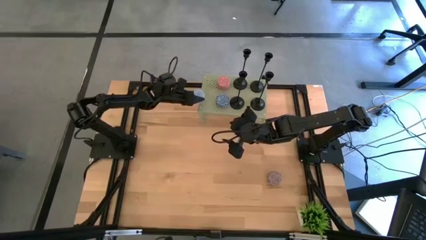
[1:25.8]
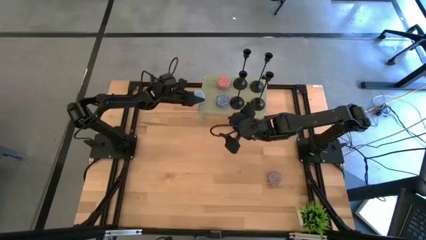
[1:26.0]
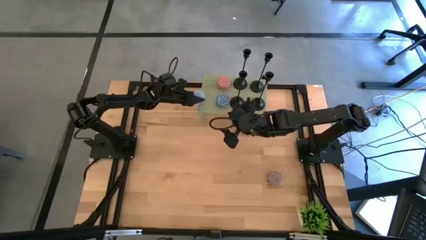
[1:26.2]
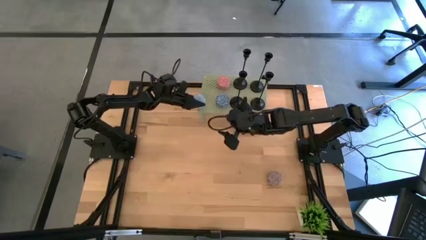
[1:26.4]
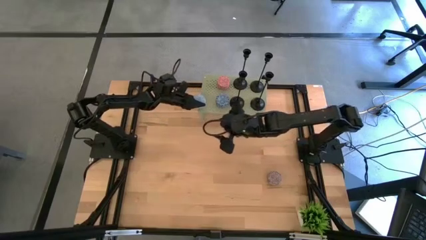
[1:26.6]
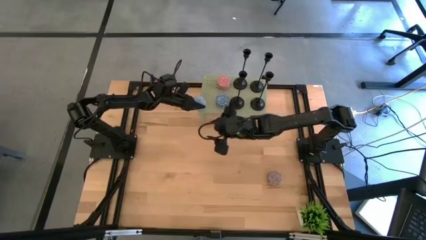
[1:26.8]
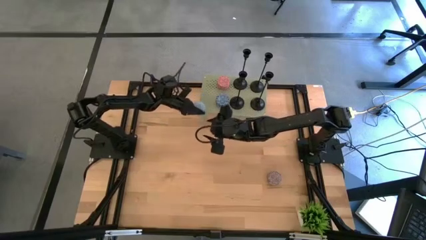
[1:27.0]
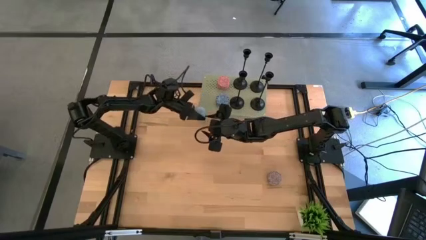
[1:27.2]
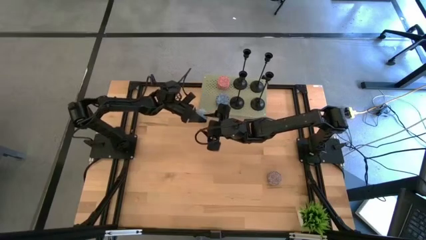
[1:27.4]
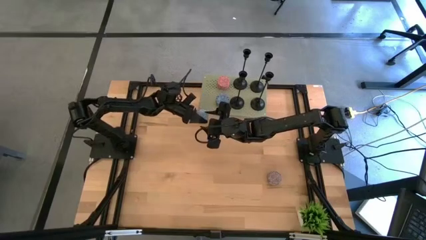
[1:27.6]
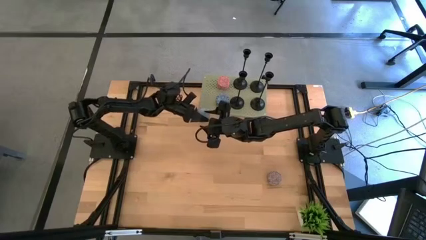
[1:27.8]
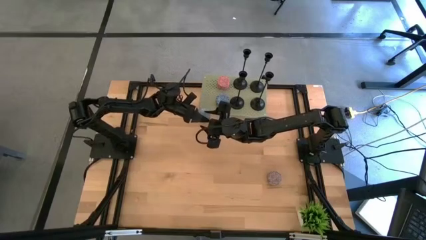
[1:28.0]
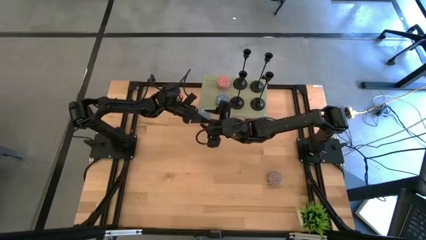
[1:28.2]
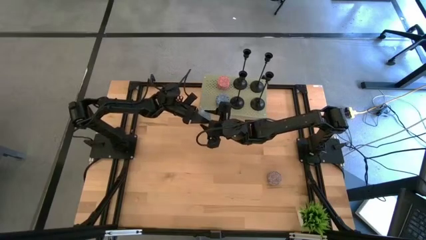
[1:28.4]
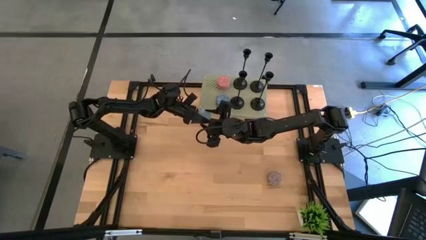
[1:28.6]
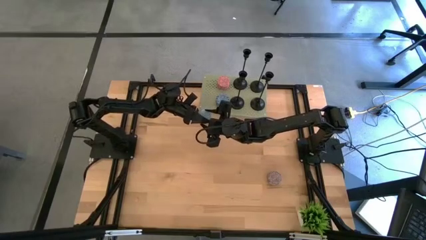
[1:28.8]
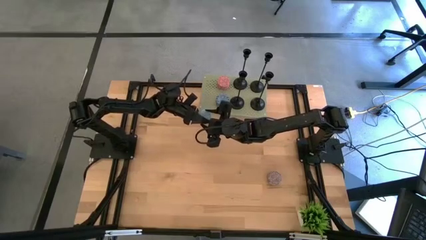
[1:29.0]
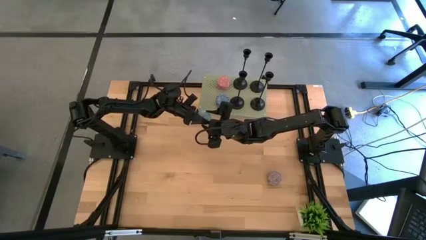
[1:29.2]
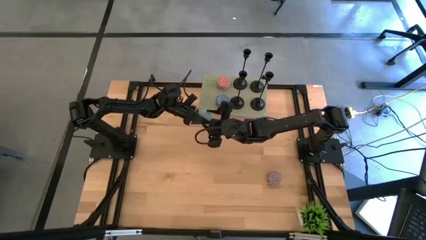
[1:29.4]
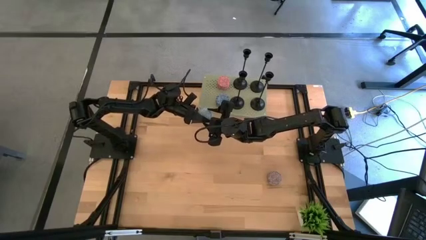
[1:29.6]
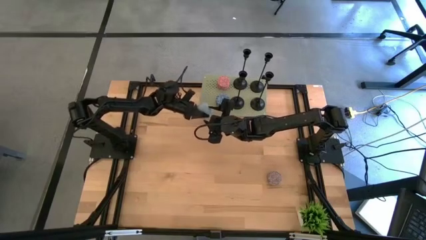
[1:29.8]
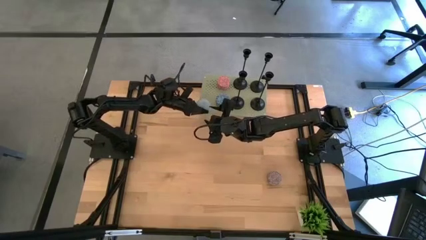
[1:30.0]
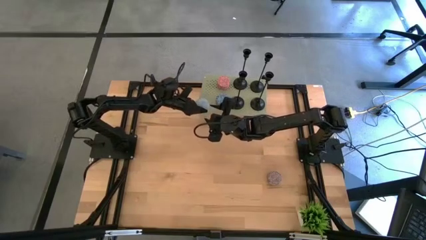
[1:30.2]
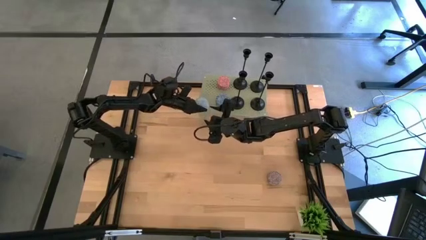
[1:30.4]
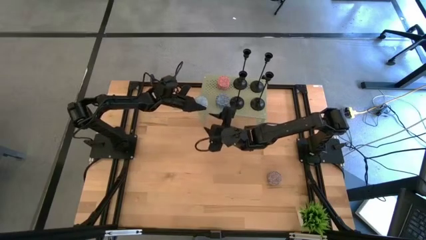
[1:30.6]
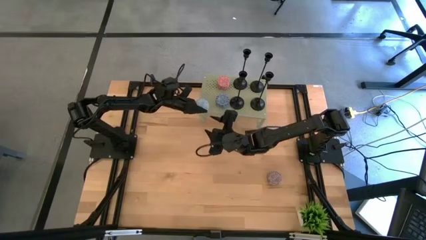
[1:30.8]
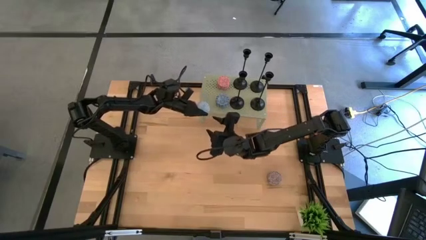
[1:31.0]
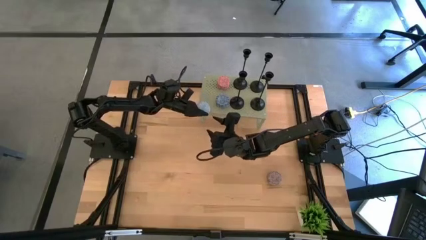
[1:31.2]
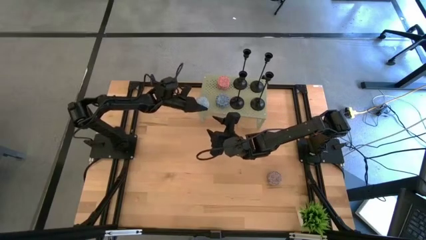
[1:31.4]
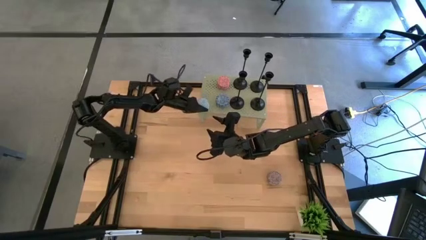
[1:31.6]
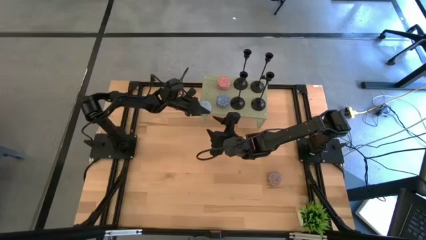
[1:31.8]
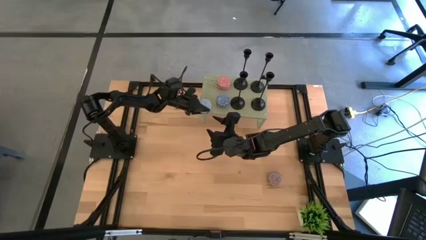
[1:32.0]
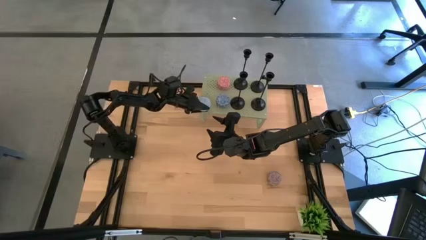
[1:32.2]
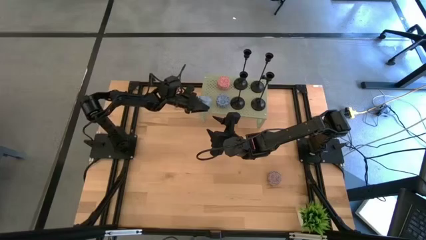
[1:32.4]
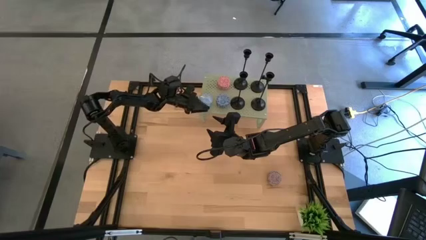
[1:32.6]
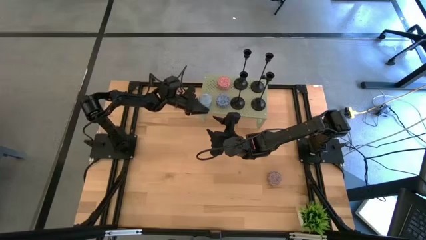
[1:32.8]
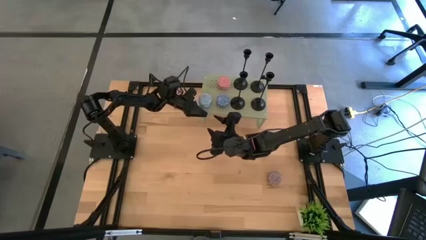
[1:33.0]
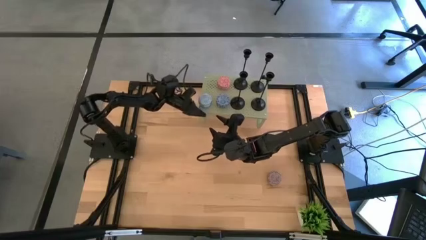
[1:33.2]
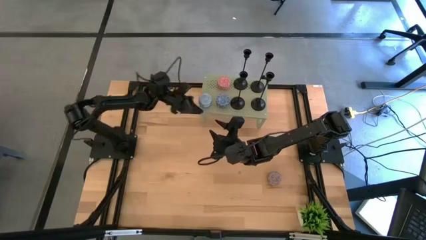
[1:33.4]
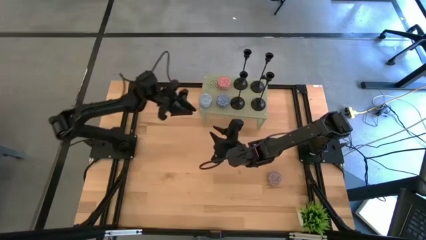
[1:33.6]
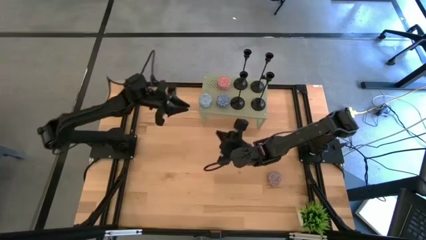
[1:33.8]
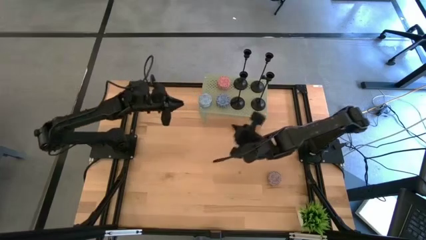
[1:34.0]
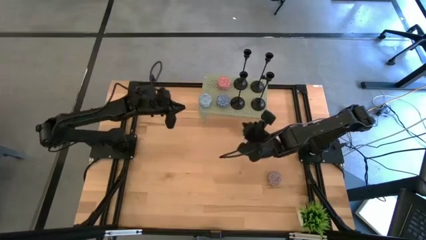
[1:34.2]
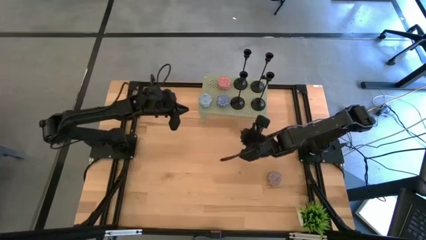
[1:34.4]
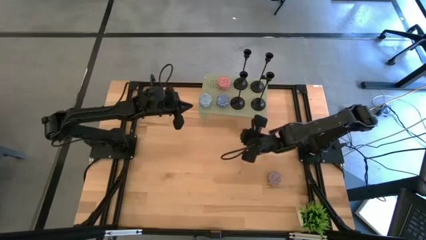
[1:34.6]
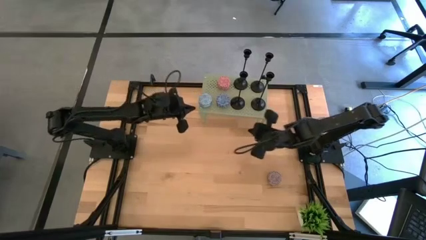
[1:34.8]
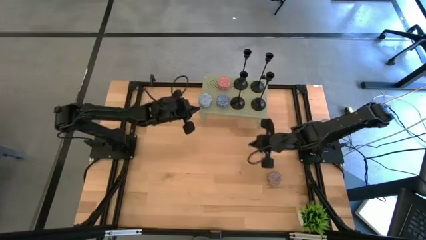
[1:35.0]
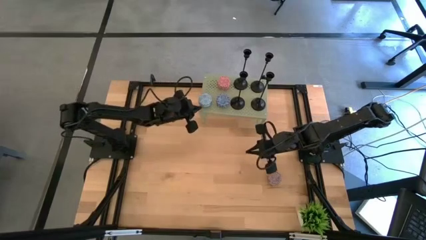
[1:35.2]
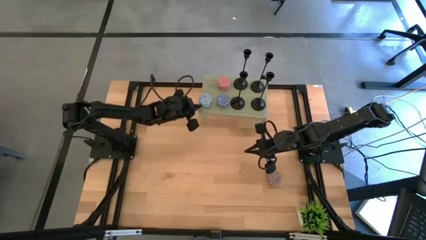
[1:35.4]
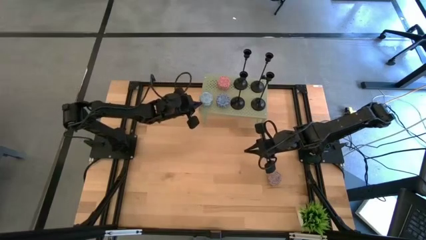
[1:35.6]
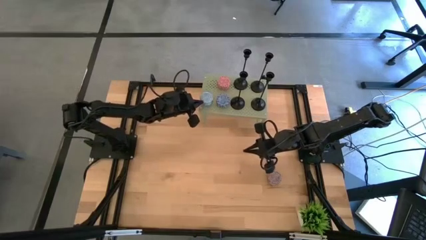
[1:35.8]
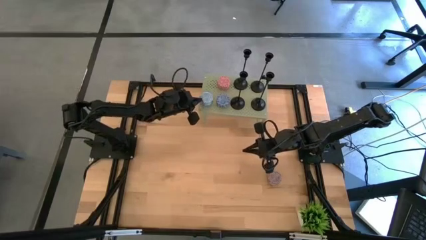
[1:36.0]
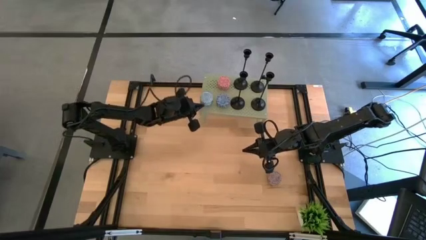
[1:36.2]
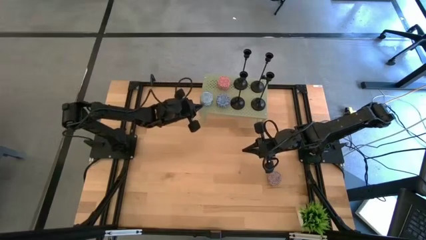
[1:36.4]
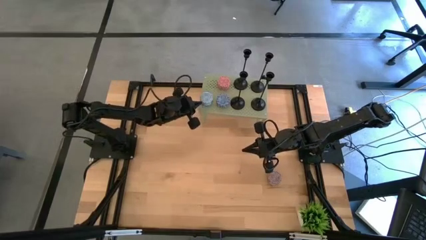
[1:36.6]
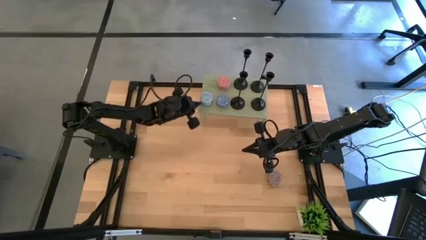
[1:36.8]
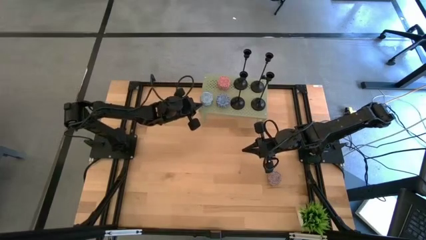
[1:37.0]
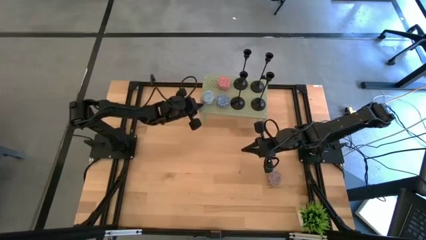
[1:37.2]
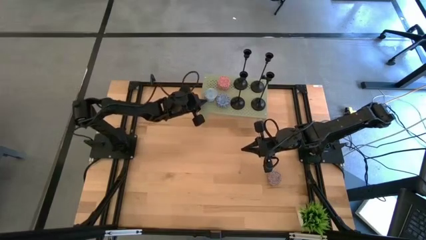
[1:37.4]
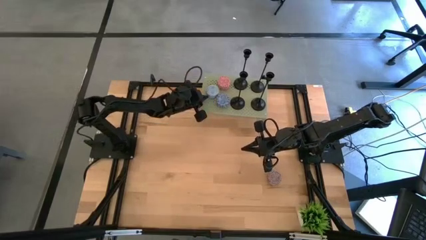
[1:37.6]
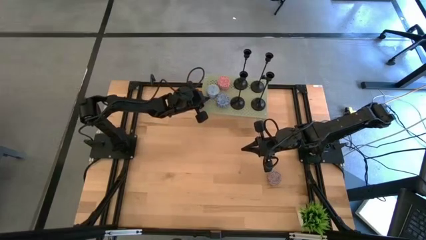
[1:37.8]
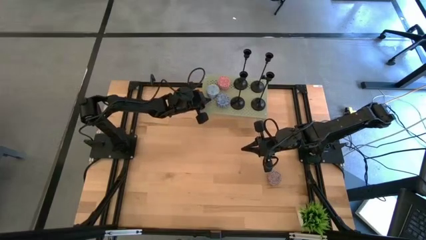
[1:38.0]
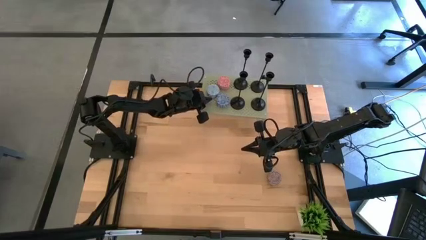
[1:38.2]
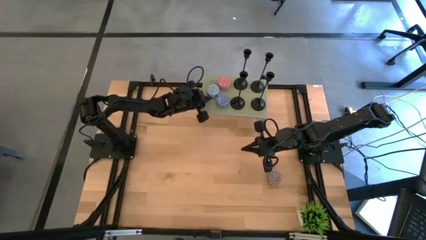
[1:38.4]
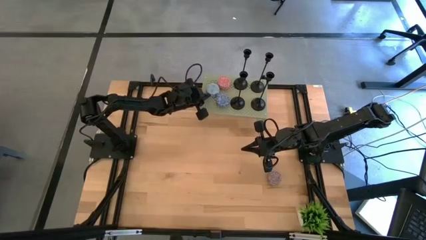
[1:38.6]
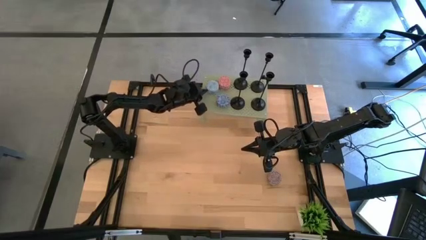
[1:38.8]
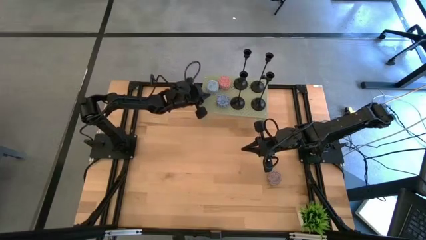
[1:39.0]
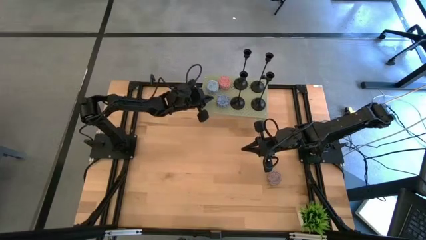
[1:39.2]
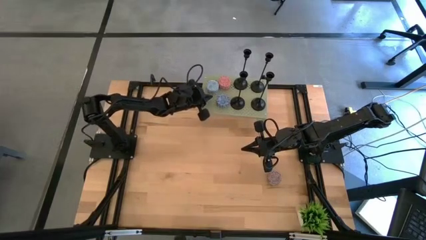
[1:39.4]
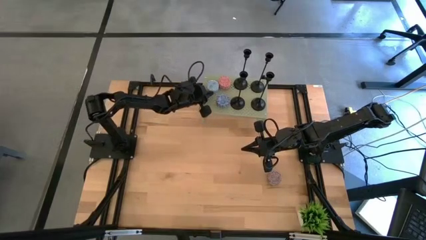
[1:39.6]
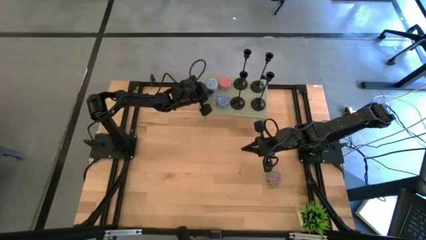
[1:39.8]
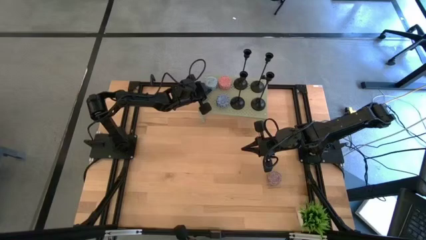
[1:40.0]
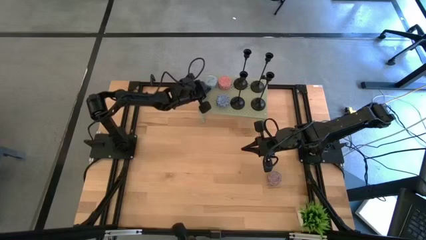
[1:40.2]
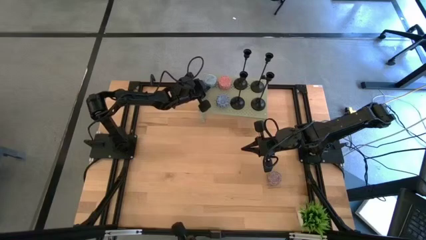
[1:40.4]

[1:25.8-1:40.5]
Task: Pick & Place candle stick holders
Put the blue scented candle on the shelf
